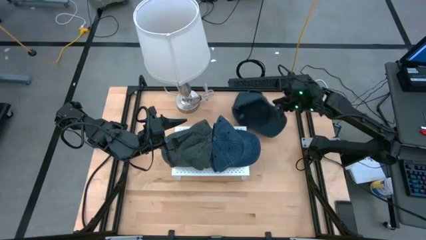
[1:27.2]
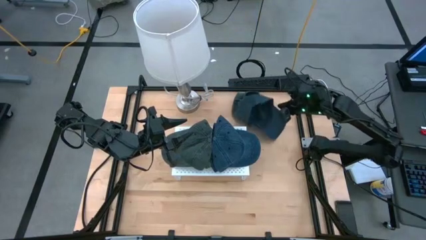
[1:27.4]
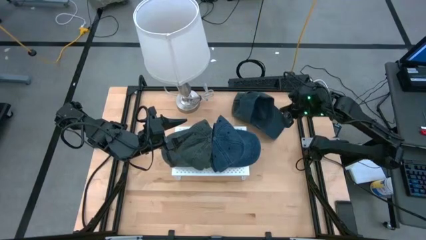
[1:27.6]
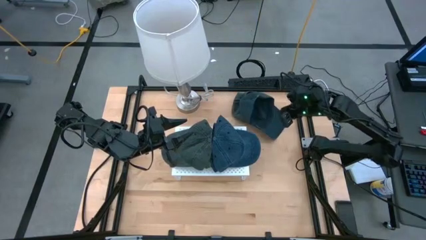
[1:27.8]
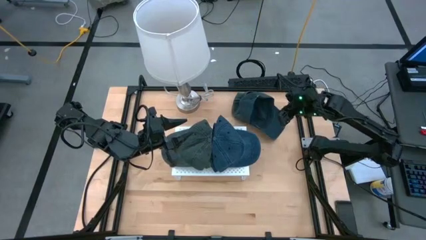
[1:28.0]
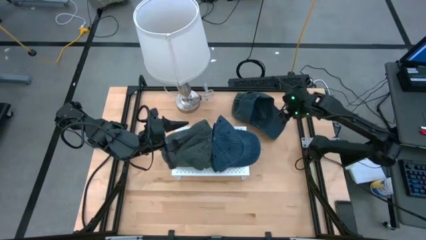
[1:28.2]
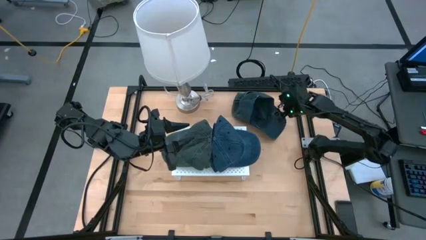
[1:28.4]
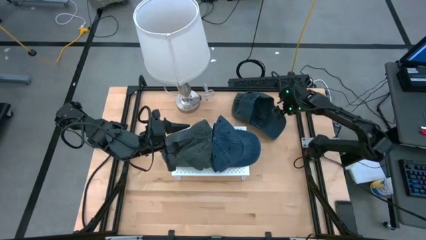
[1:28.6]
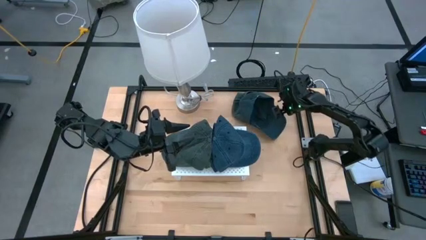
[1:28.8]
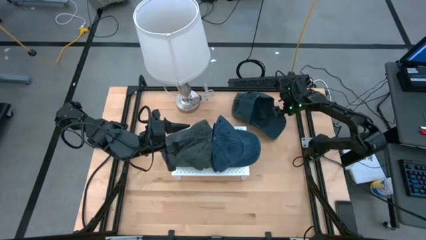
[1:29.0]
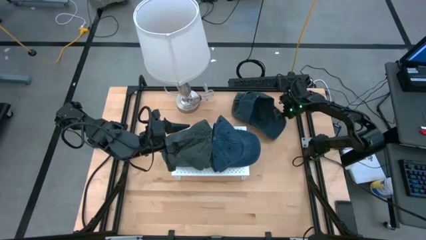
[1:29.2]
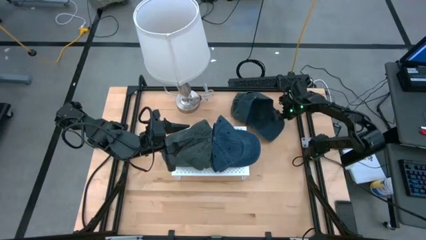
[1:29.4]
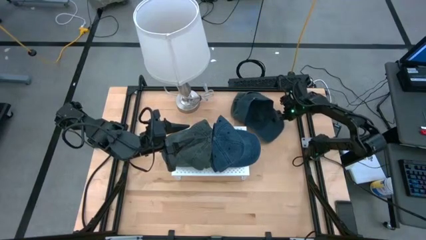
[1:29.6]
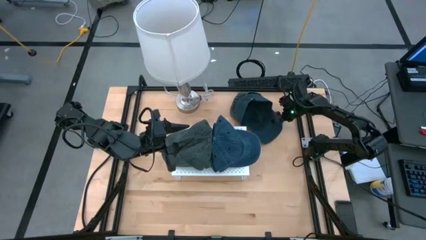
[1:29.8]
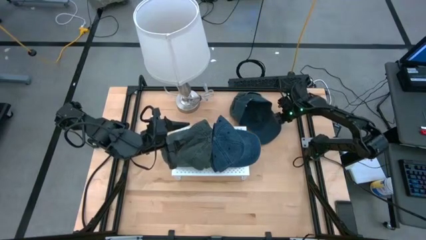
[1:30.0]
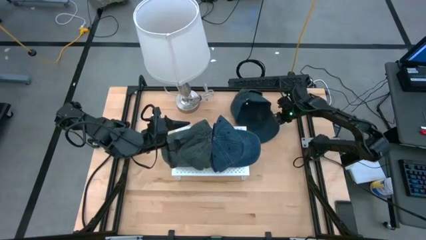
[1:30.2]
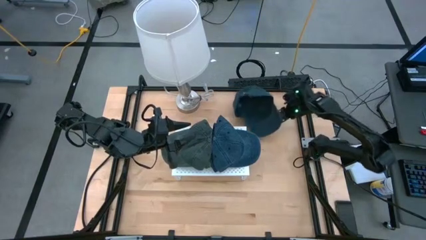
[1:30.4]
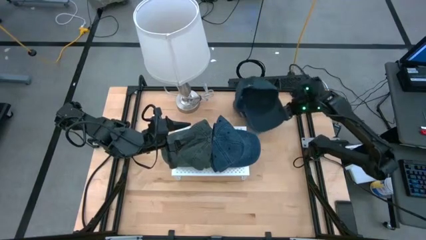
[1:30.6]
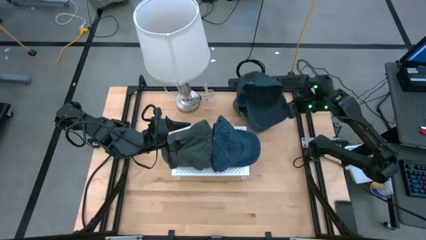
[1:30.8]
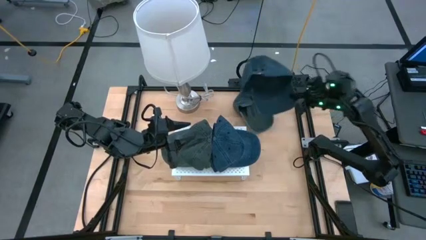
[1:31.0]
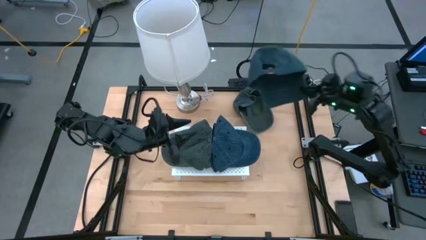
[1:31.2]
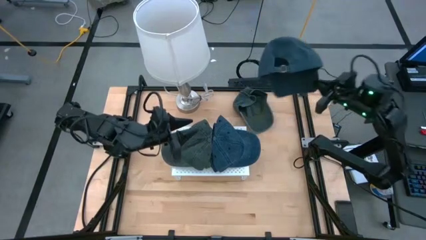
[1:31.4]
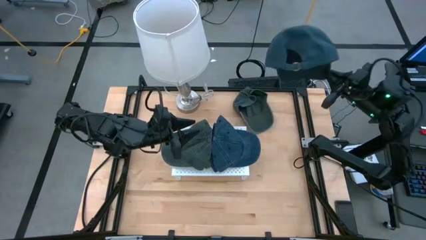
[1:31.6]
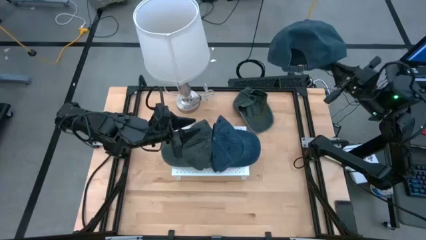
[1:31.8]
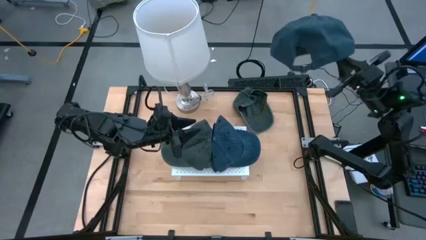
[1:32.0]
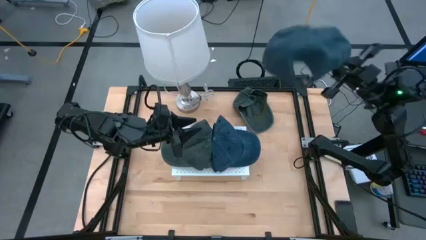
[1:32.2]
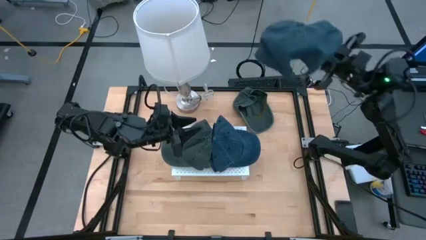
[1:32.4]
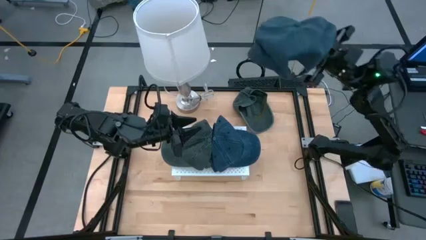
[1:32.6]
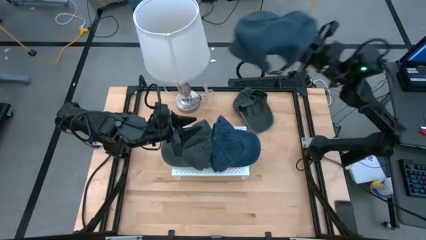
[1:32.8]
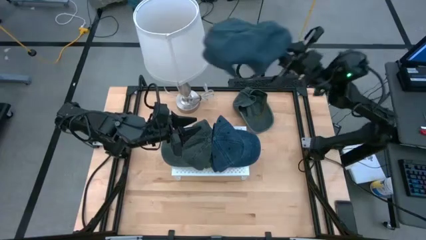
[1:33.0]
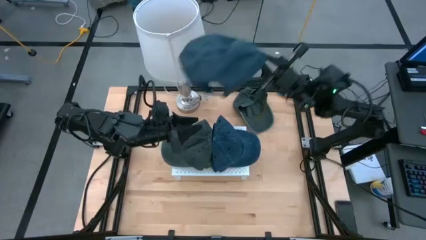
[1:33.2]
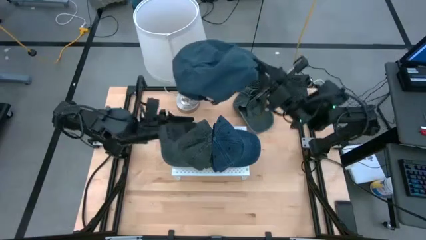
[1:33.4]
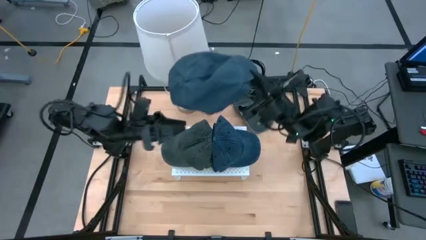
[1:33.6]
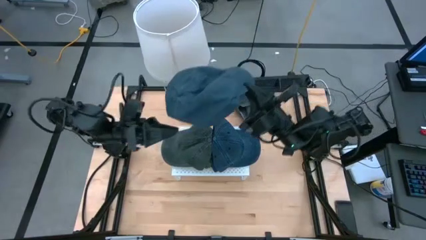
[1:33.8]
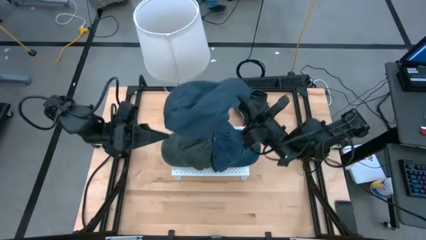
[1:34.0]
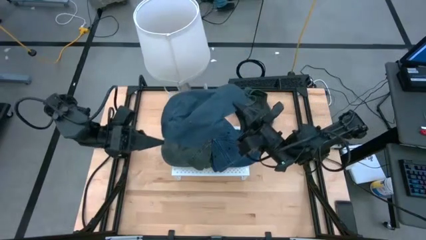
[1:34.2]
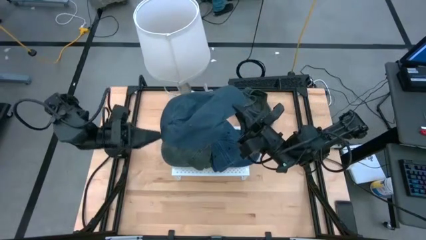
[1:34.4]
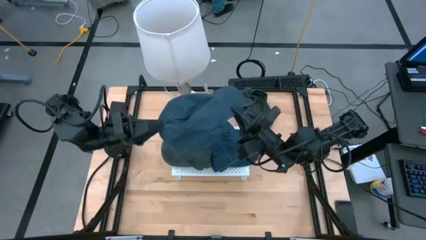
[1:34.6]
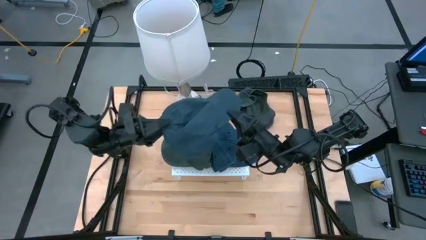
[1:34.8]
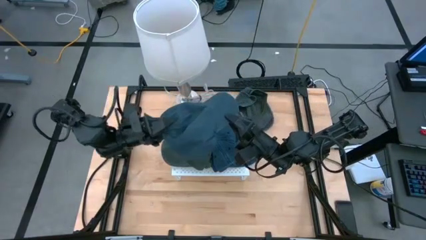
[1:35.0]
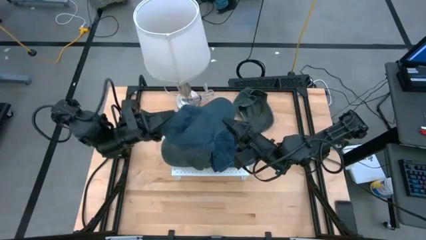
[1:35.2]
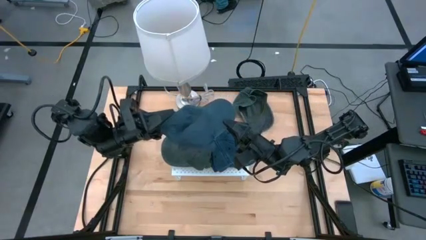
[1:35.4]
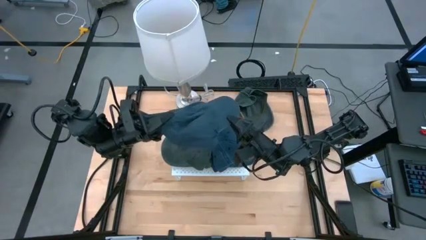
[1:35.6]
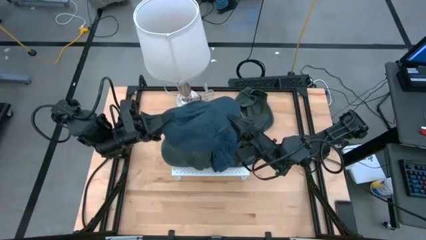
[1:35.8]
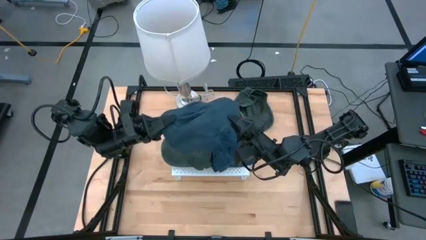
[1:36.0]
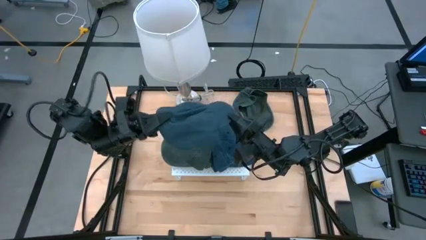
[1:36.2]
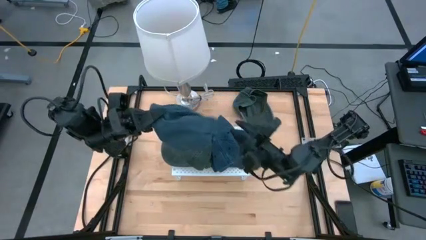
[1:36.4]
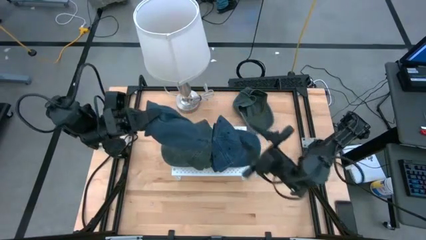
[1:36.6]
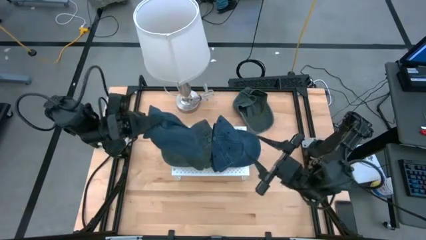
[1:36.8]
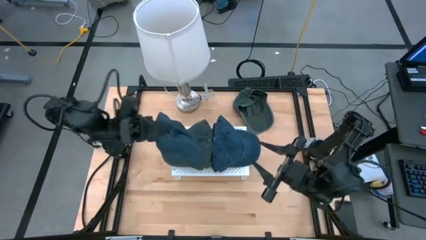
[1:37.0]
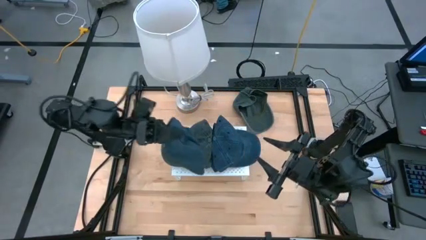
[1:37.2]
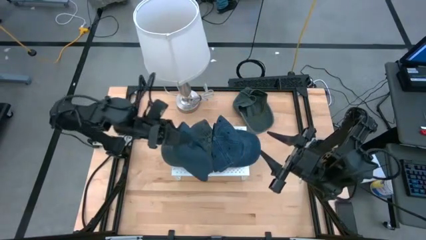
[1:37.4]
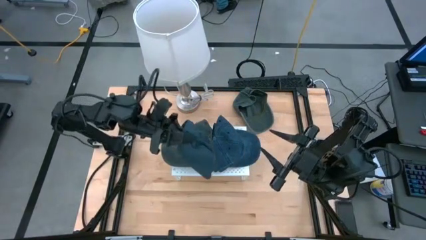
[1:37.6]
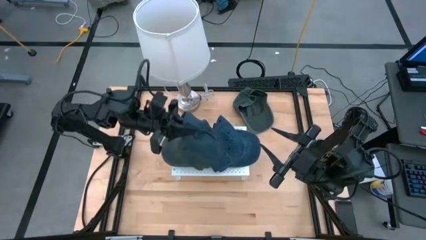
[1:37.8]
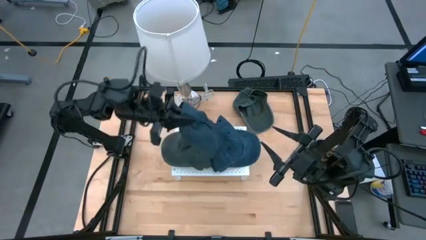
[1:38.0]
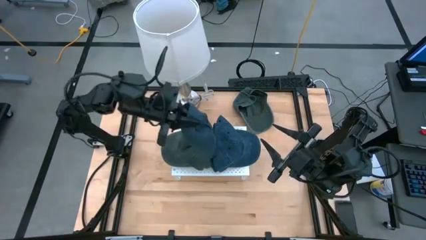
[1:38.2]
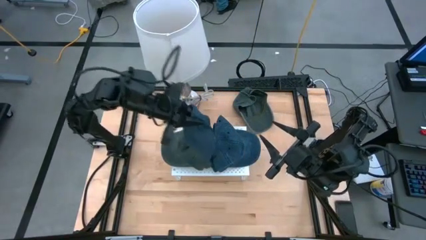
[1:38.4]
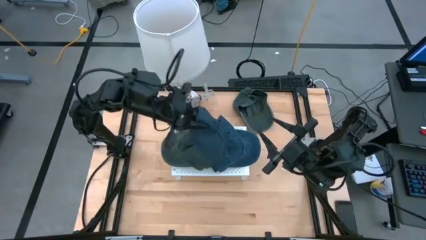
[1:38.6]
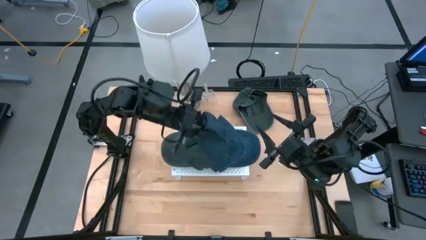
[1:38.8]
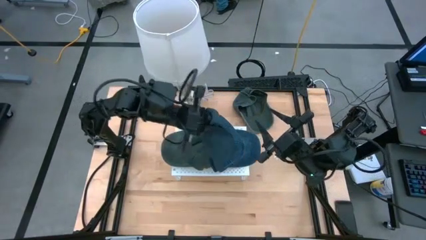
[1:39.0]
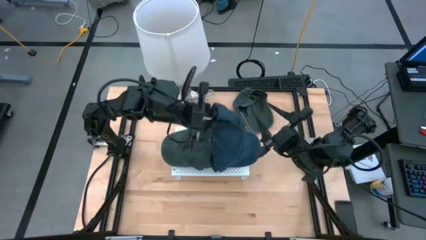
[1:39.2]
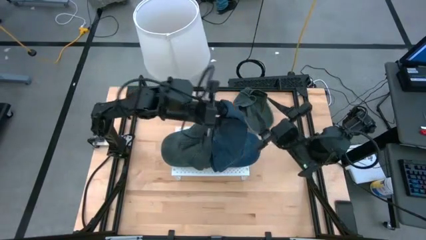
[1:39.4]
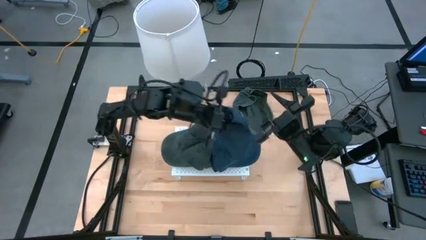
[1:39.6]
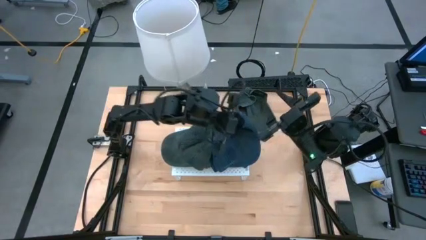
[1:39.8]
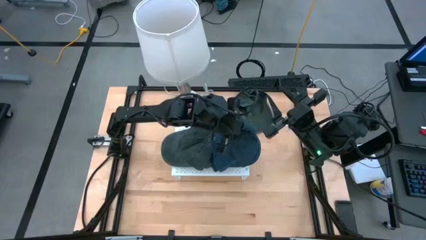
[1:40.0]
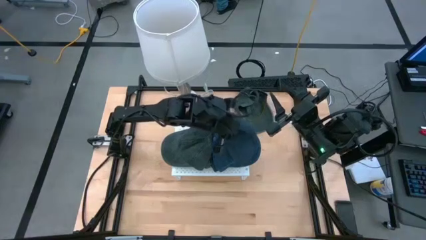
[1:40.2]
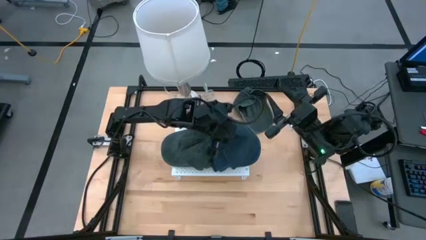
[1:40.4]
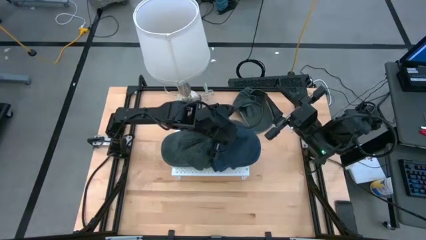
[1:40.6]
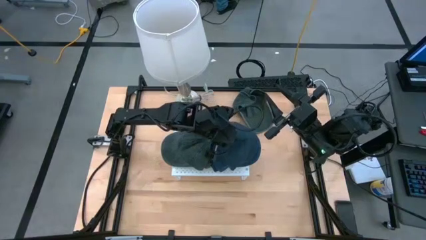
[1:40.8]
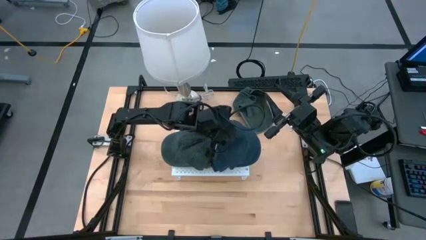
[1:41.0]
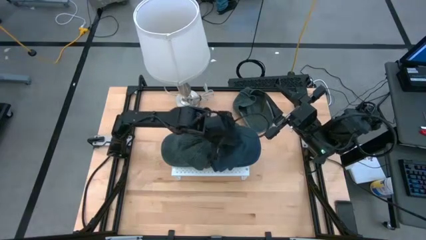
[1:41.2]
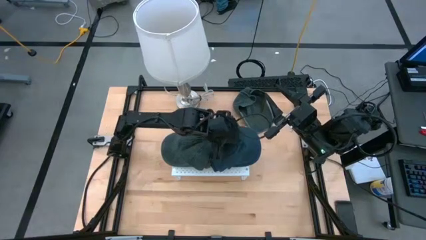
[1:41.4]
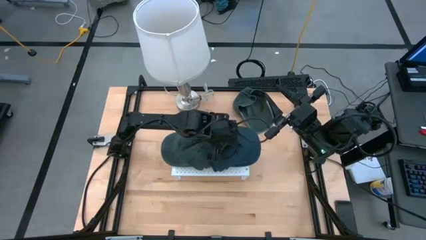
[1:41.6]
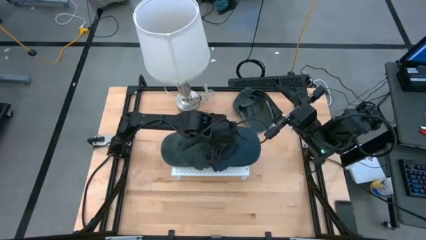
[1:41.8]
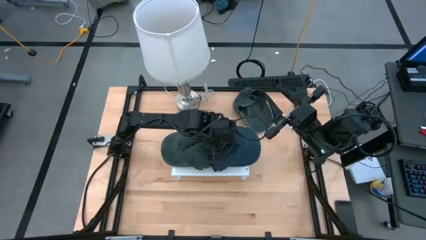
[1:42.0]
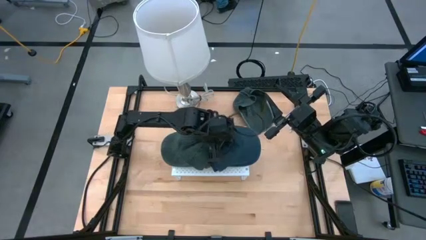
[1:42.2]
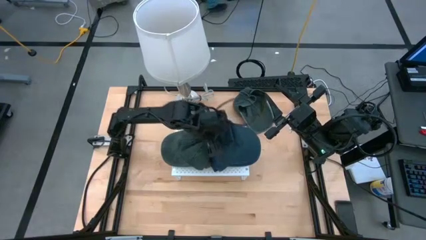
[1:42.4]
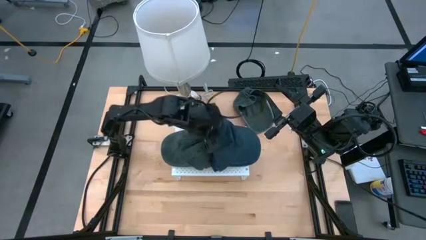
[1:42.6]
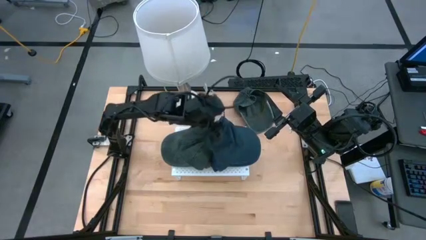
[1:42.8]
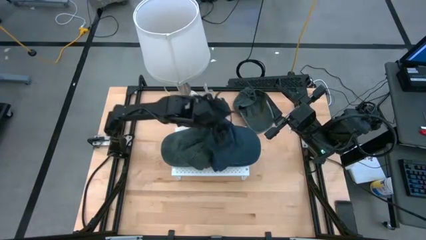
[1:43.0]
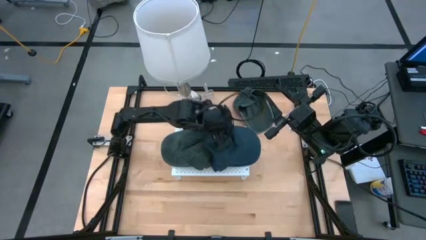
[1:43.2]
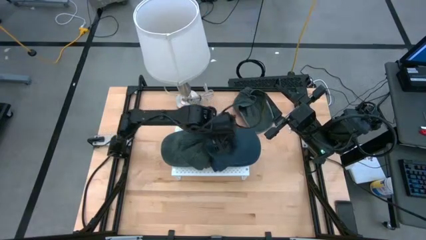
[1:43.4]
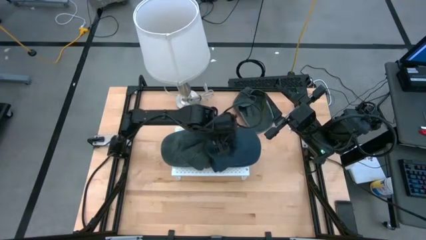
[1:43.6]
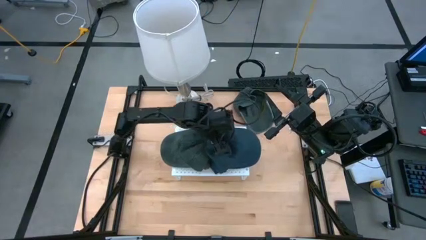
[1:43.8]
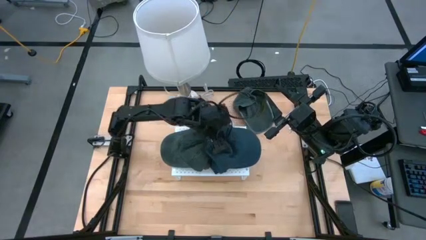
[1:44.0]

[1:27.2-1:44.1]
Task: Pick & Place hat
Stack the blue cap on top of the other blue cap on the shelf
